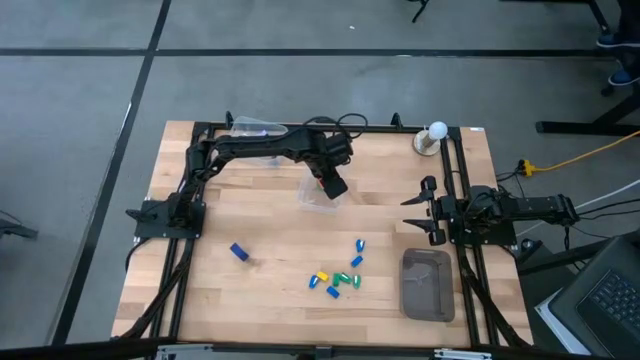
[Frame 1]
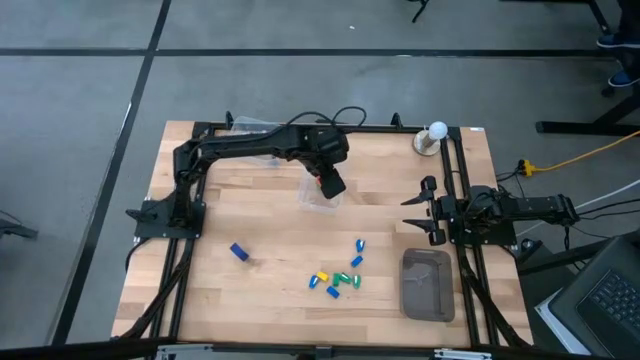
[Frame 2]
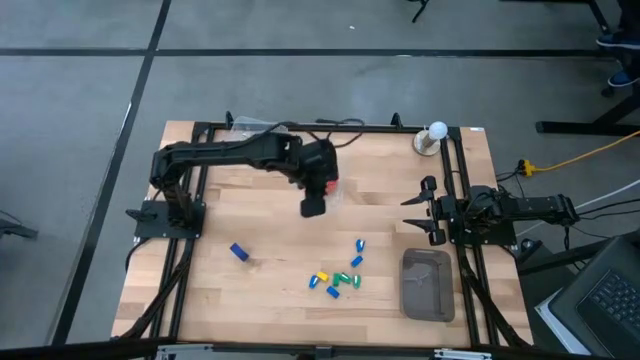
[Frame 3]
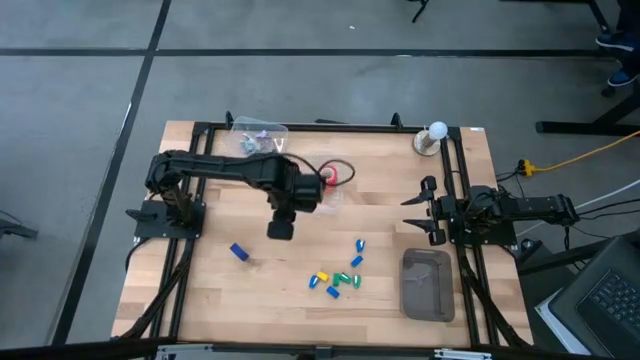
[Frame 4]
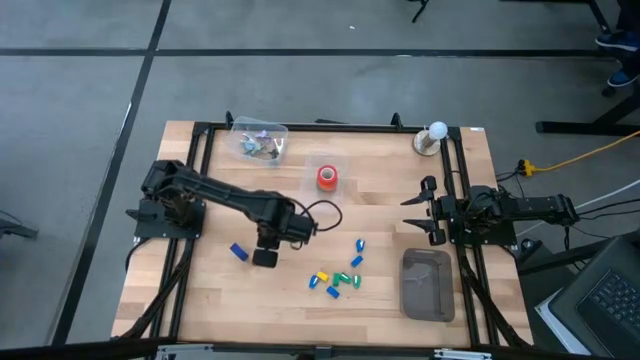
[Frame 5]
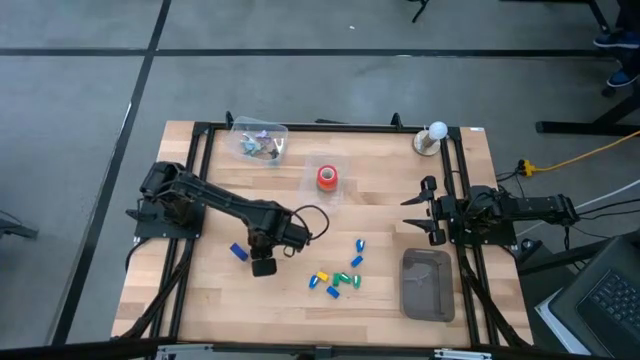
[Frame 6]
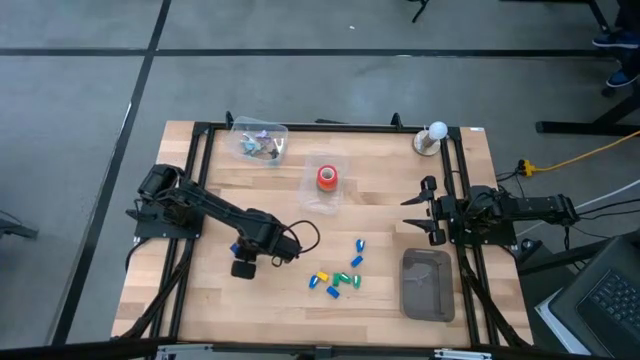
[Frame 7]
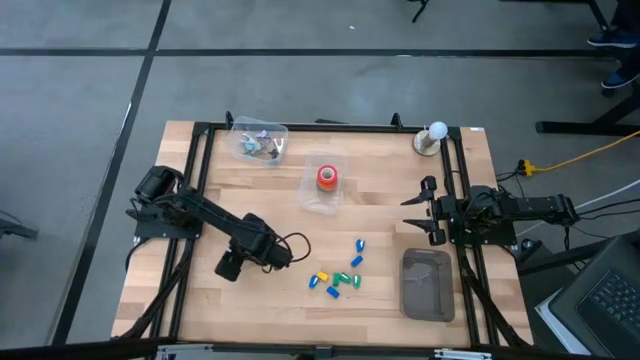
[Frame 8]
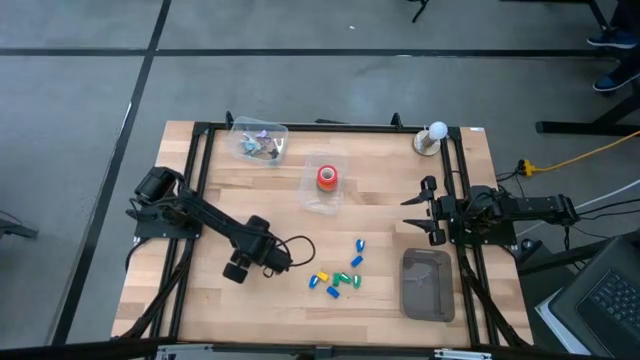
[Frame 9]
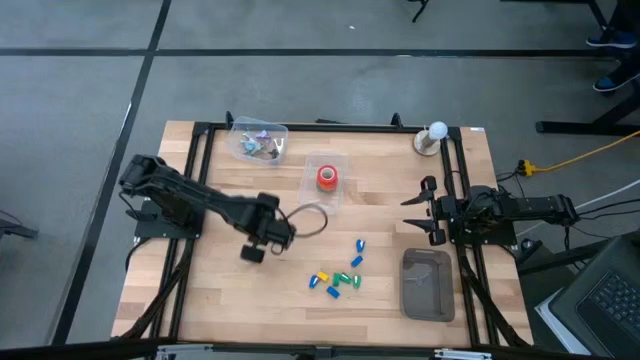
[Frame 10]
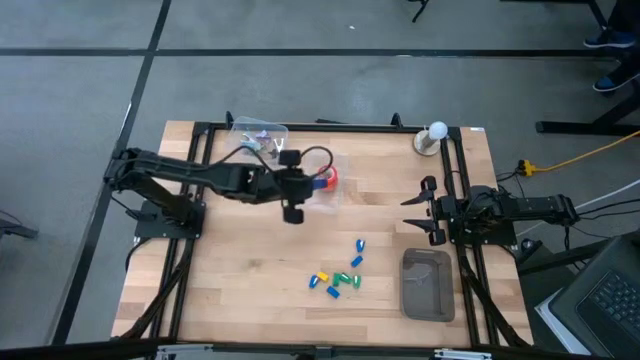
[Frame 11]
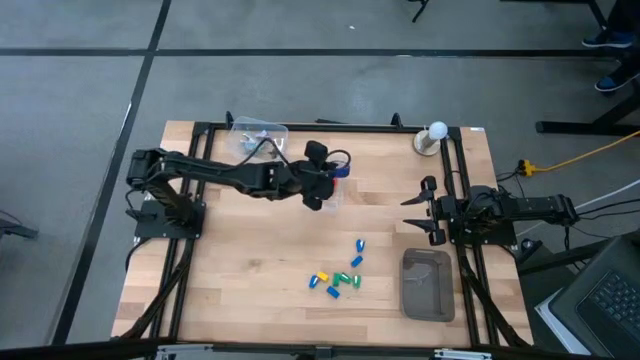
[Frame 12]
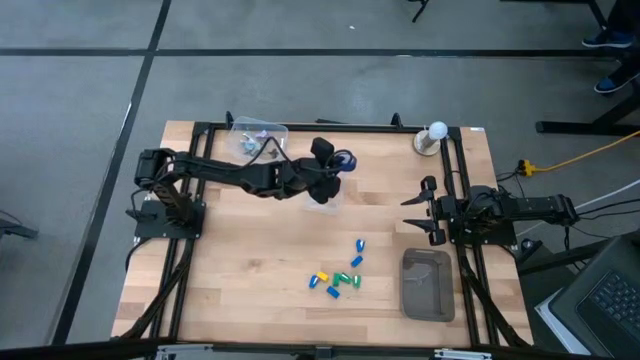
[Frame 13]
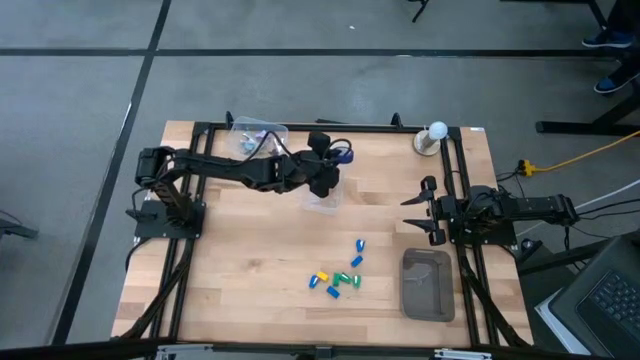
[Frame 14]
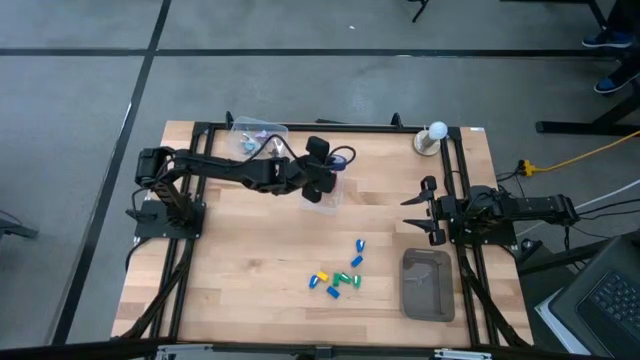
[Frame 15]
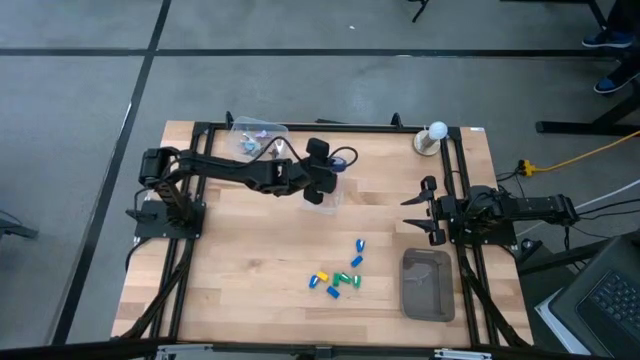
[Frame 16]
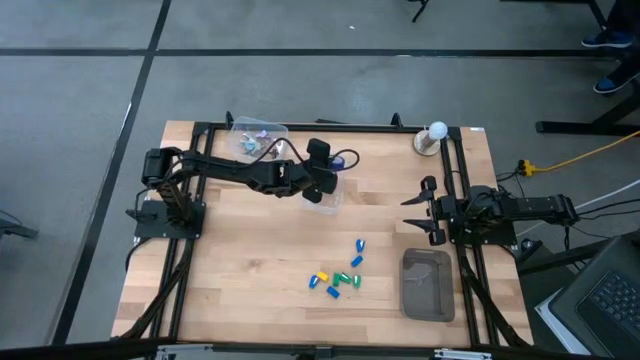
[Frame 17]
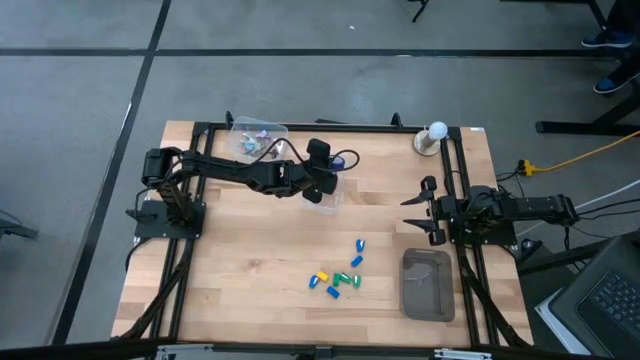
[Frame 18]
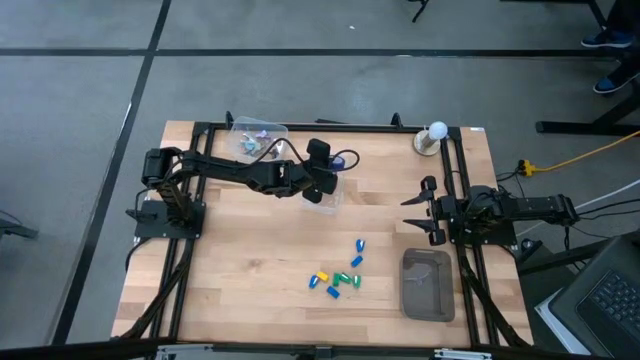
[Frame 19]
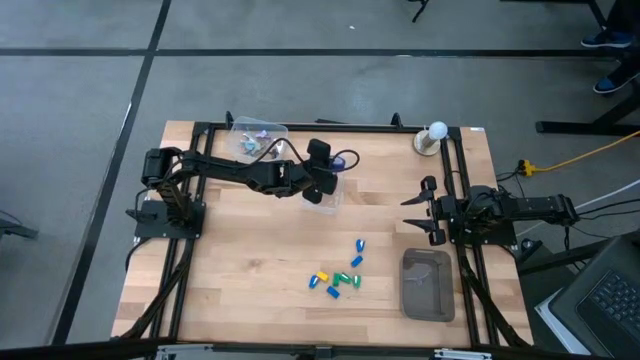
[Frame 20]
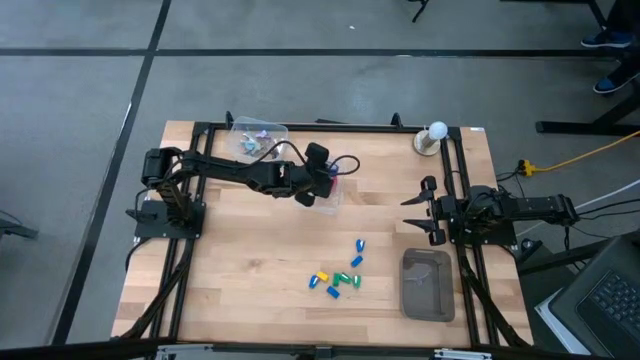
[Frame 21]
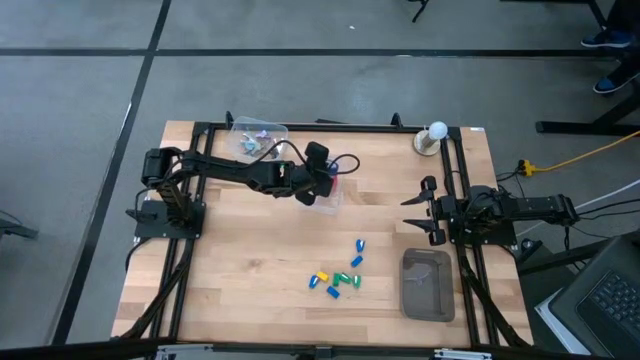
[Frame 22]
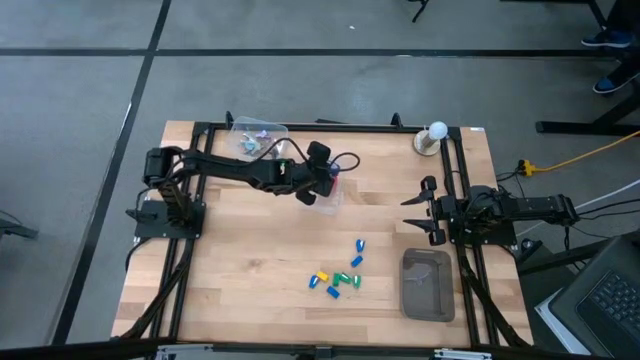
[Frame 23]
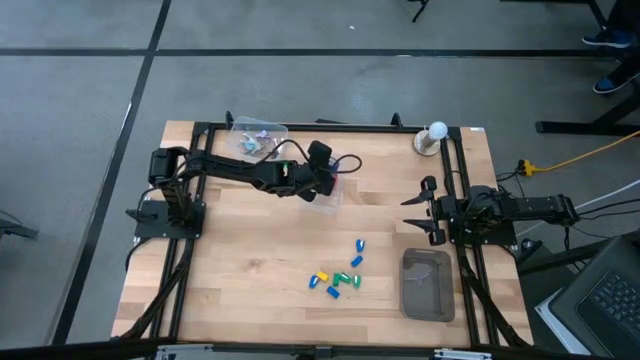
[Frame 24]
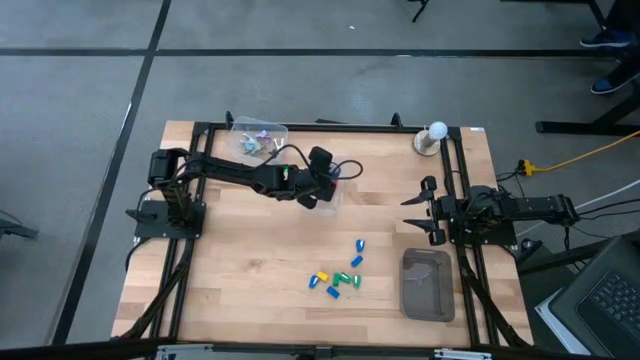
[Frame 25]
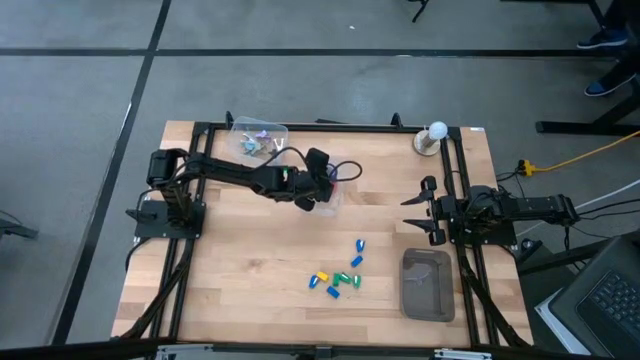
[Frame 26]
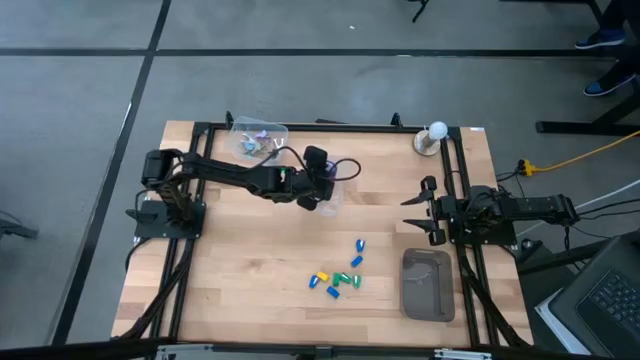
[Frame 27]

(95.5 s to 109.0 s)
Task: Pick and place Stapler, Stapler remover, tape
Put the blue tape into the bottom transparent bin

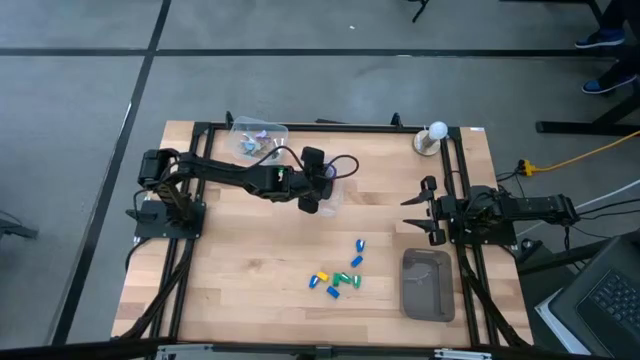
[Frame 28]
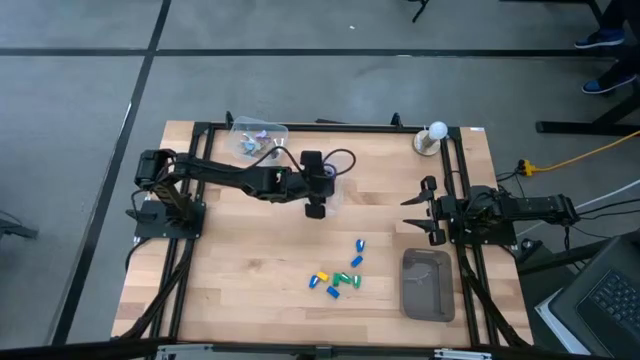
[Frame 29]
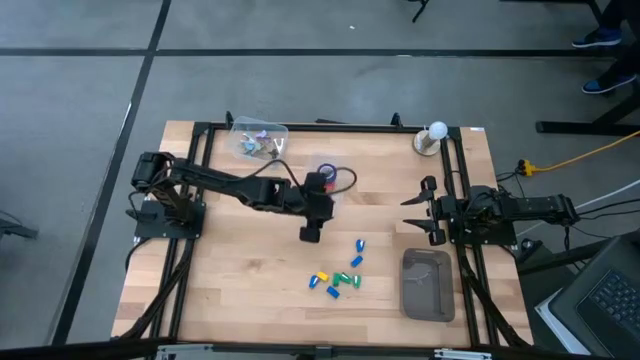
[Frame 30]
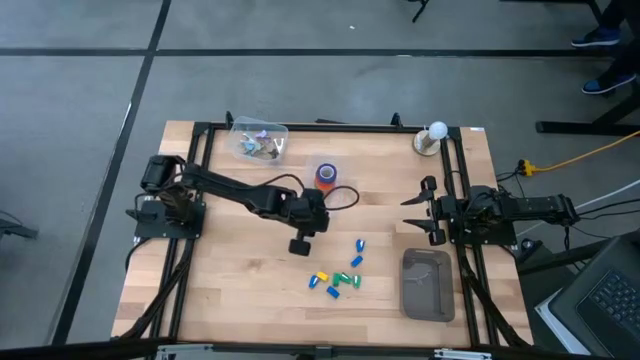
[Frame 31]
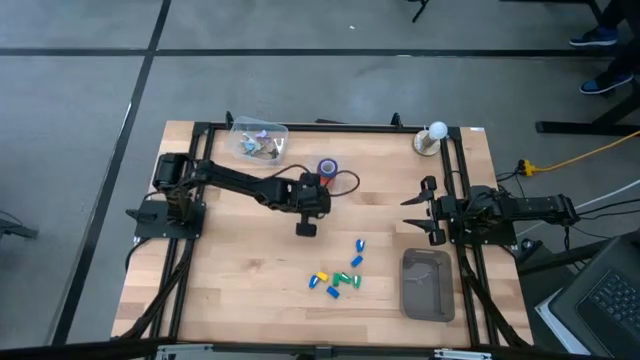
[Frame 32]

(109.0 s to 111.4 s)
Adjust the bottom transparent bin

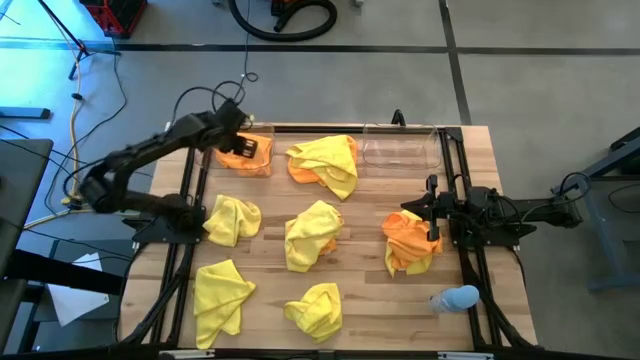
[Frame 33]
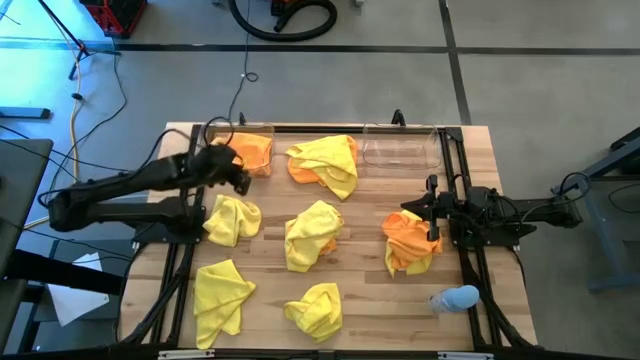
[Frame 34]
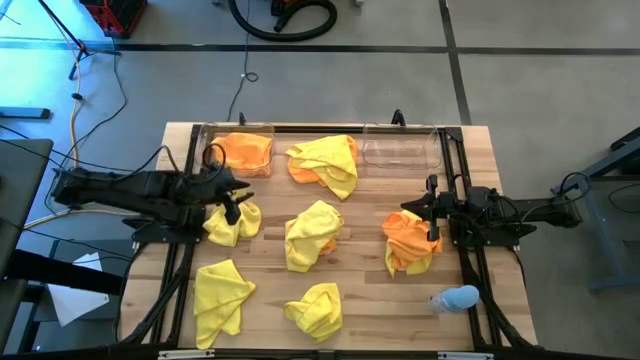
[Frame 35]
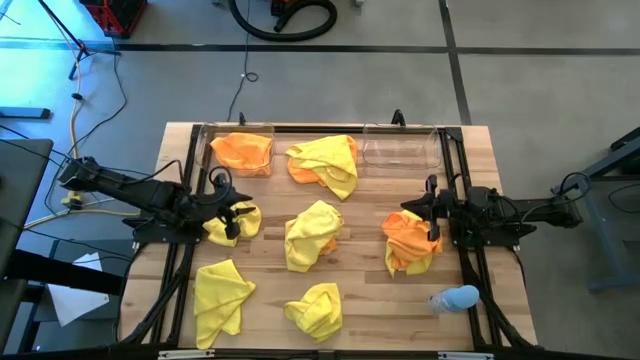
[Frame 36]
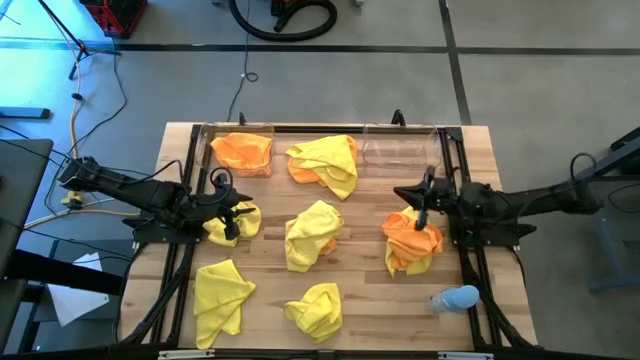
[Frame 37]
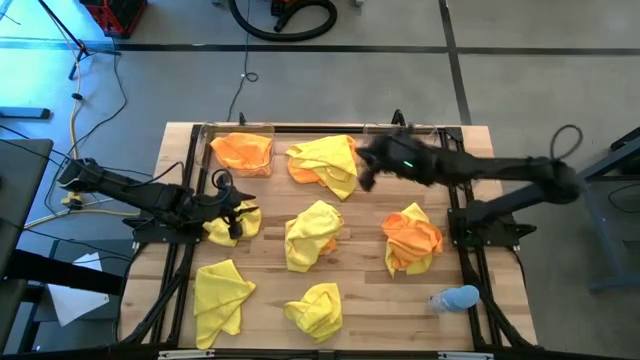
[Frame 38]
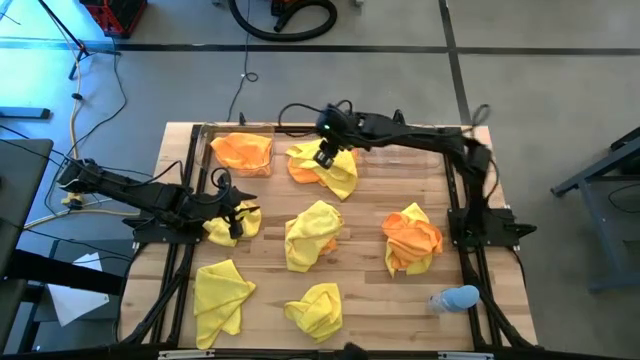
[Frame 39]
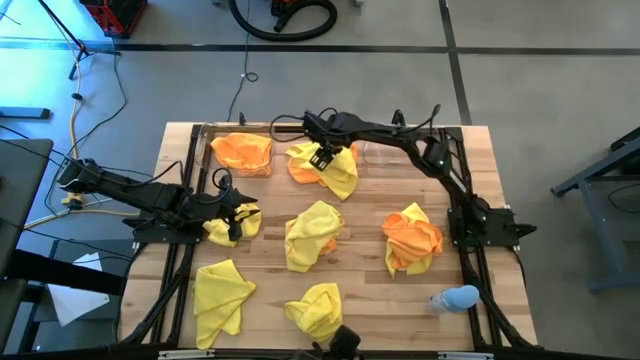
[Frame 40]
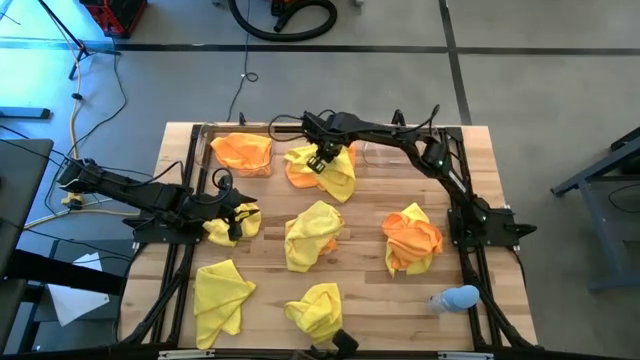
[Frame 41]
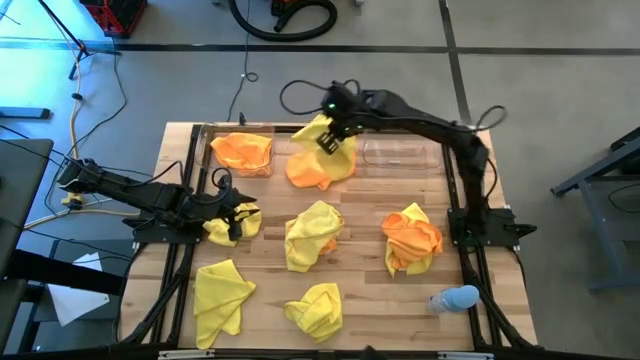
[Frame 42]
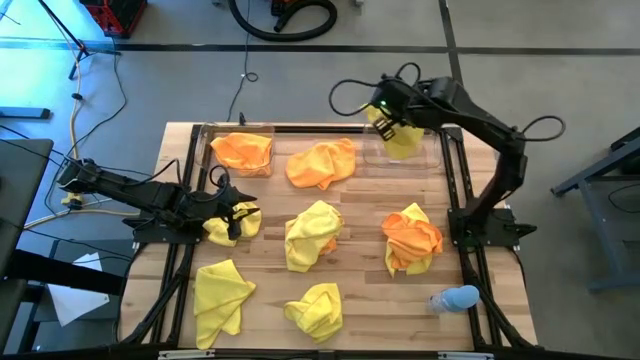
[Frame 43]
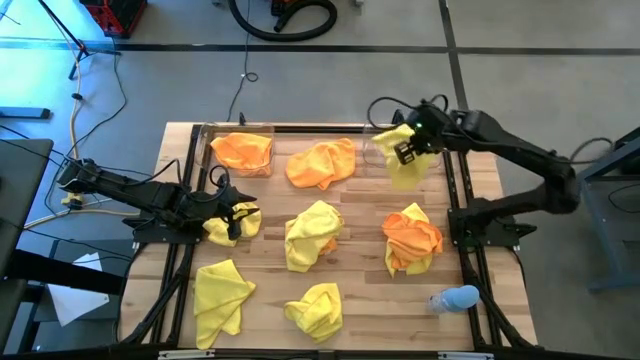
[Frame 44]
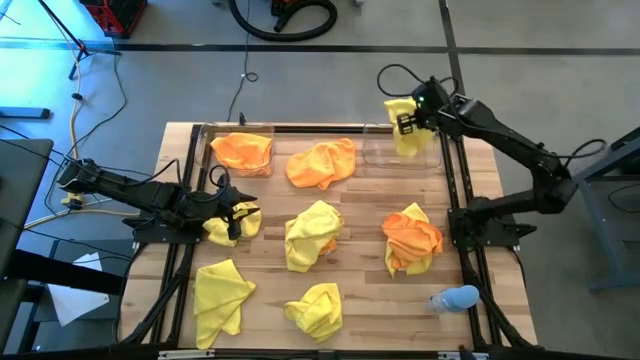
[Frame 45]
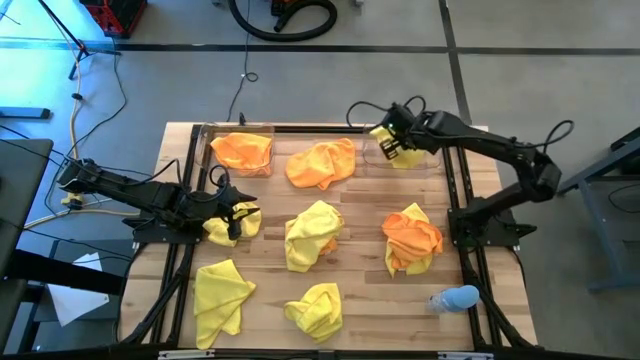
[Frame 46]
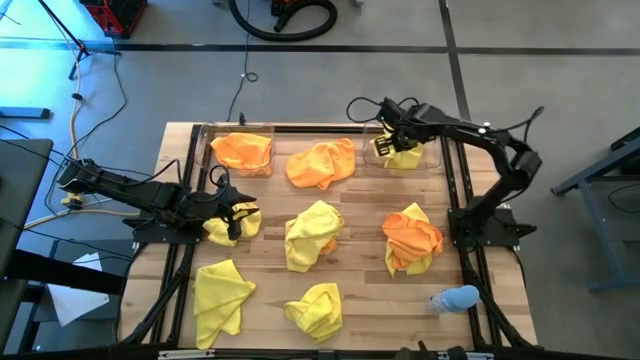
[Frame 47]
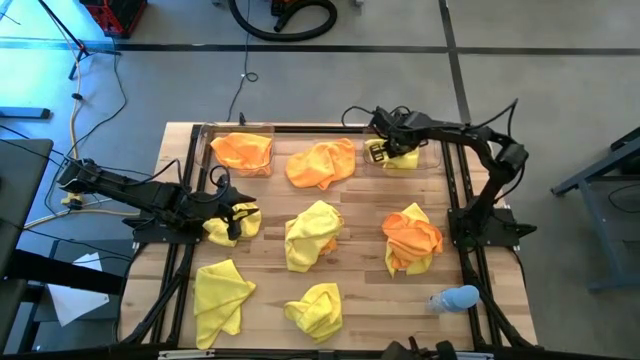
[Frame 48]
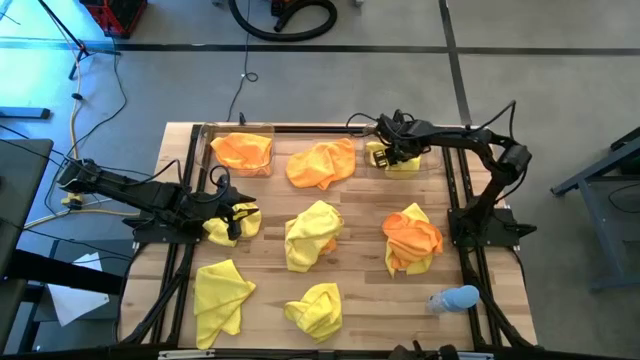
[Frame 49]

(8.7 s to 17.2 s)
Task: Sort microfiber towel by color & place in baskets
Put the top yellow microfiber cloth into the right transparent bin
